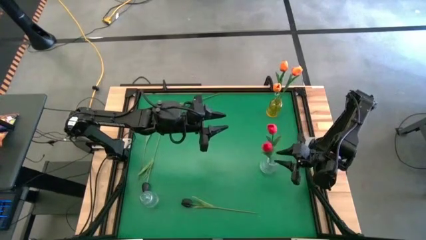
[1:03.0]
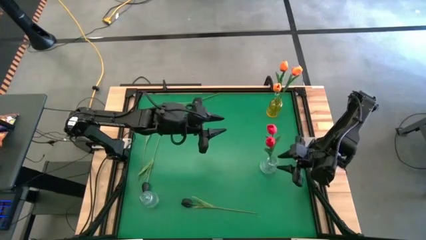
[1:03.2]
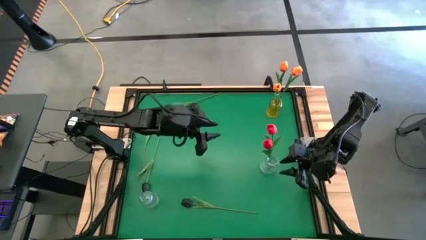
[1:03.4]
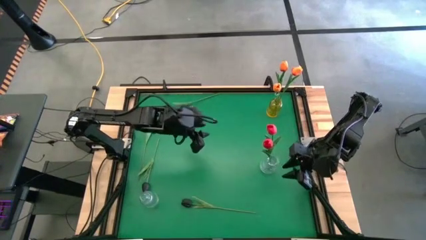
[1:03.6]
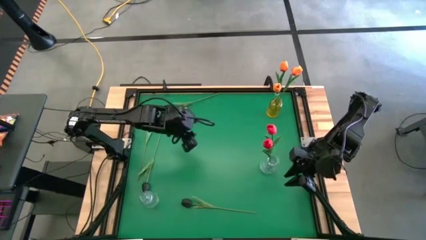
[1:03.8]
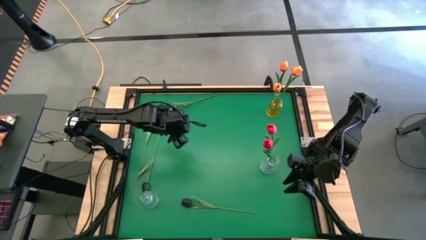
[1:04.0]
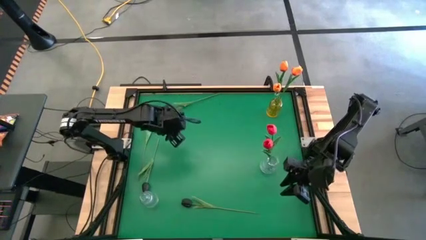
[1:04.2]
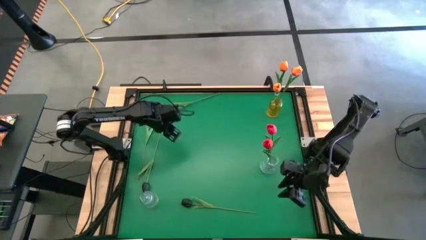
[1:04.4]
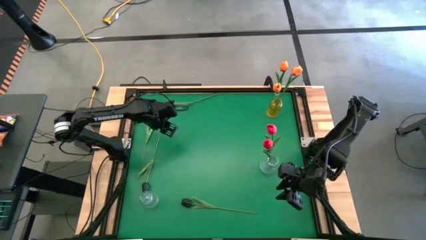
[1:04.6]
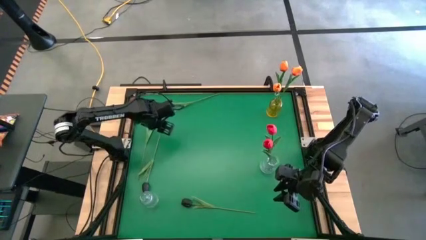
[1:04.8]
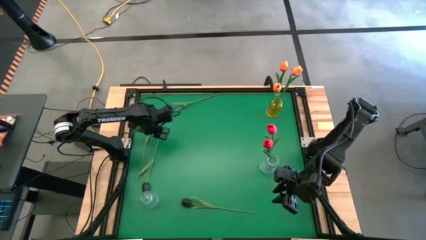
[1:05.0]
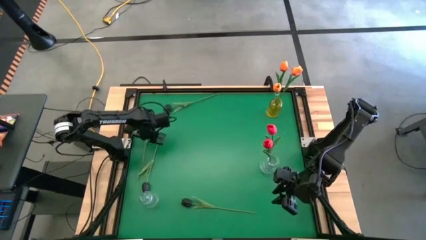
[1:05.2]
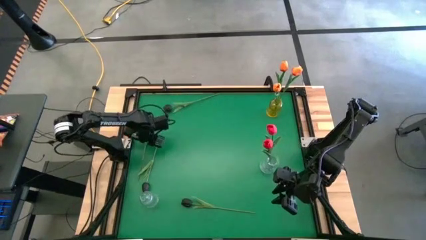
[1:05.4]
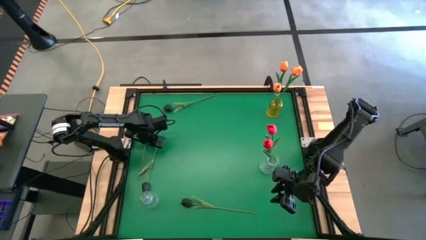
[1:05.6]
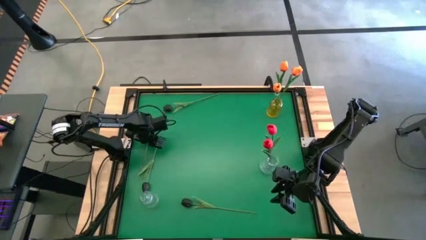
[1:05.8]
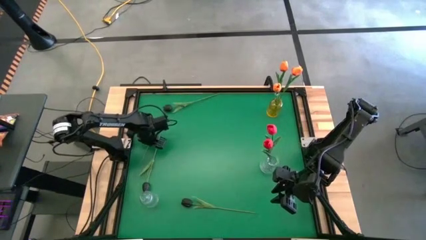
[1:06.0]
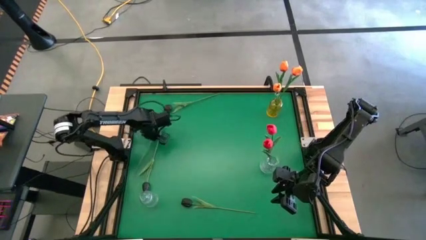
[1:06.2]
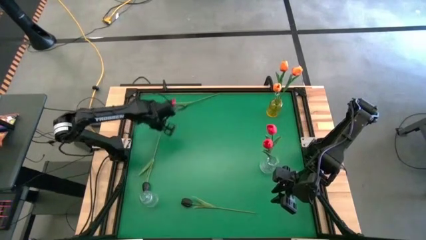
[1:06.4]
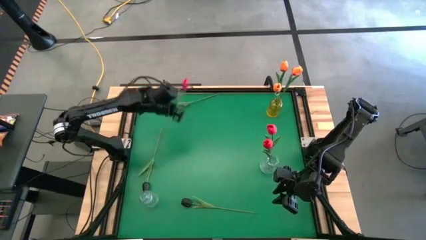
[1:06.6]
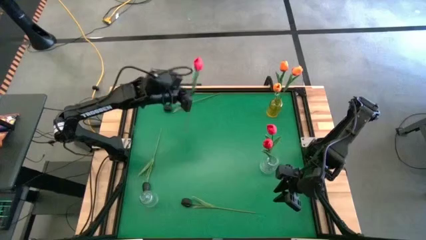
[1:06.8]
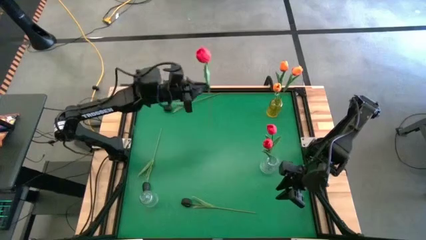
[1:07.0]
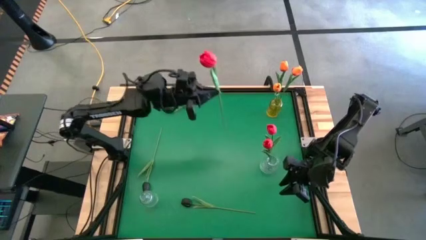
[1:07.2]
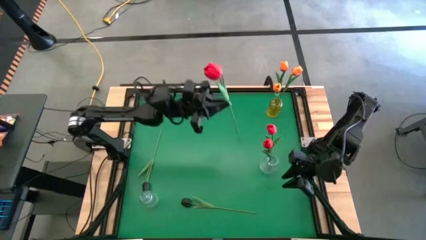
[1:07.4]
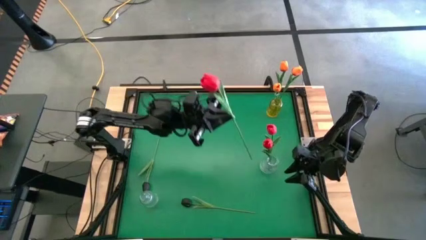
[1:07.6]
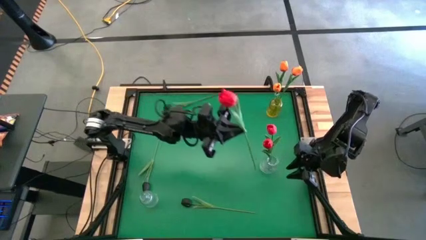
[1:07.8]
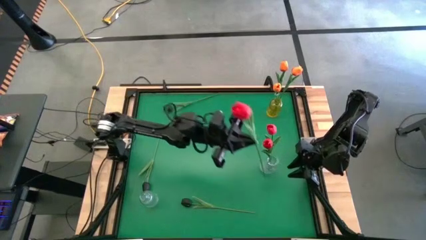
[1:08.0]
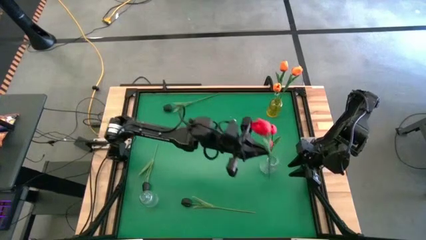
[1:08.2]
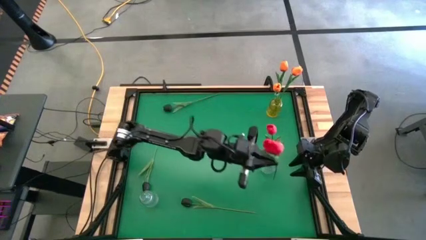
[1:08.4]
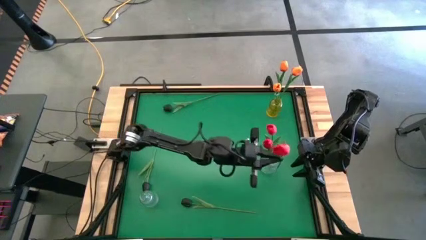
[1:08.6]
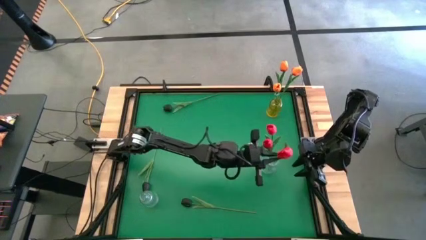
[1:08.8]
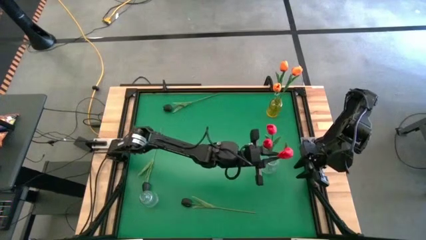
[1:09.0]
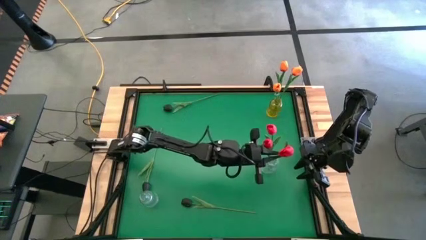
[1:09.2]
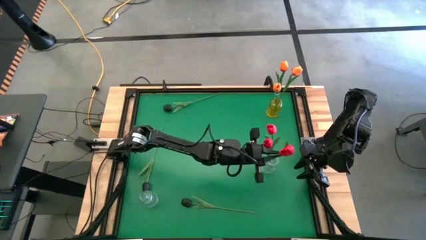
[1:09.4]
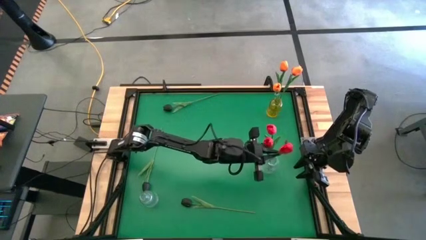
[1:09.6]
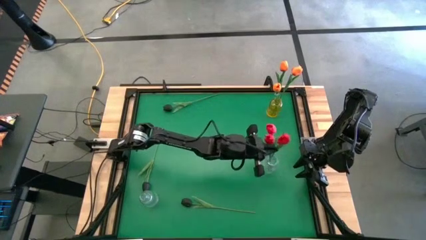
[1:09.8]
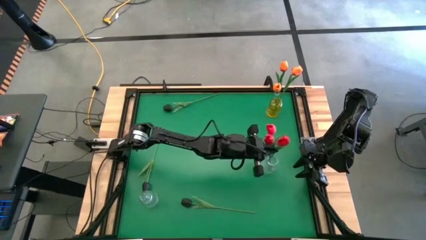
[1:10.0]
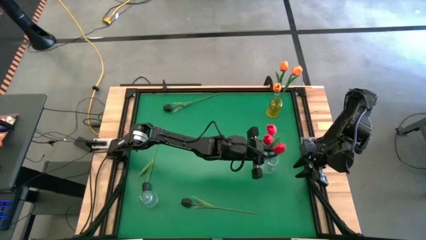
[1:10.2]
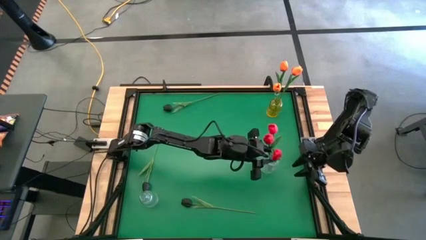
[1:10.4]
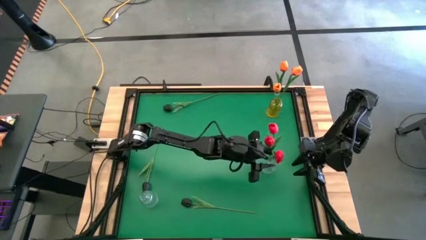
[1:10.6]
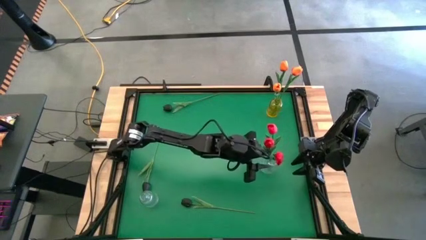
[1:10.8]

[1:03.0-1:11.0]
Task: Sort flowers into vase by color
Put the red tulip into the top transparent flower vase

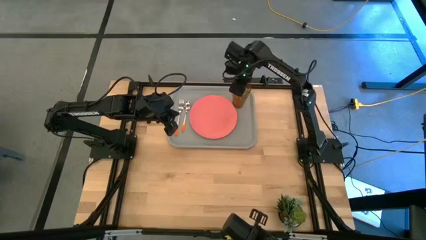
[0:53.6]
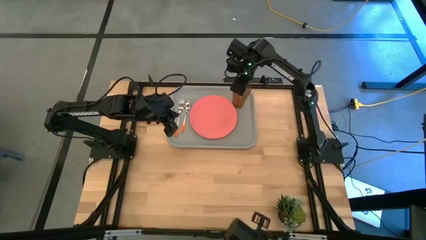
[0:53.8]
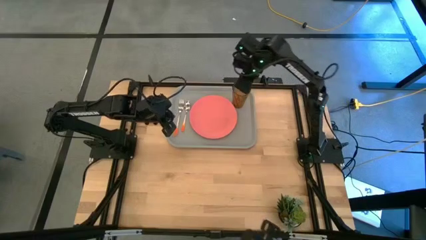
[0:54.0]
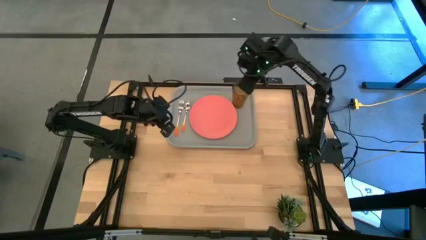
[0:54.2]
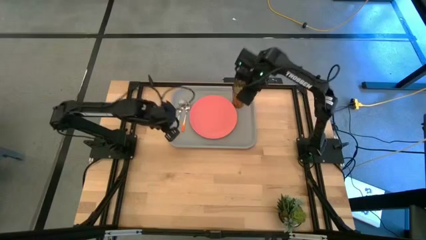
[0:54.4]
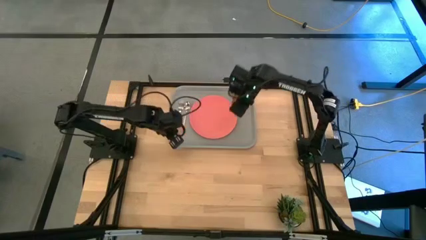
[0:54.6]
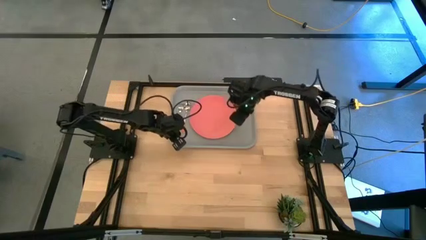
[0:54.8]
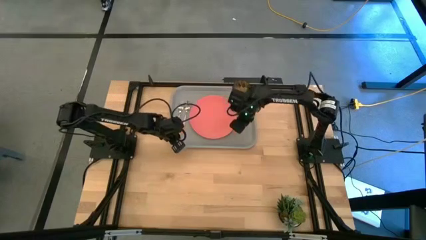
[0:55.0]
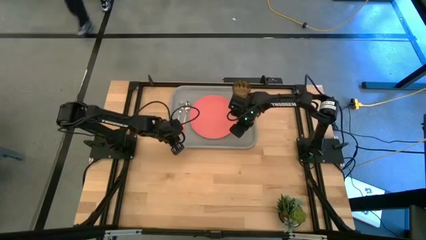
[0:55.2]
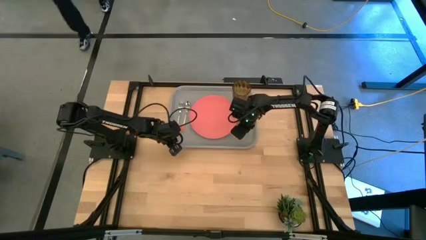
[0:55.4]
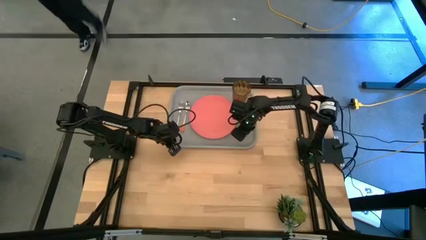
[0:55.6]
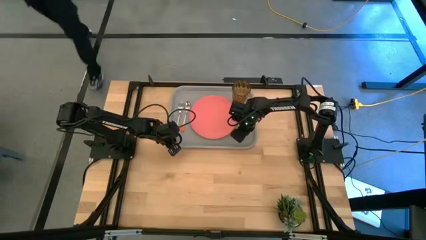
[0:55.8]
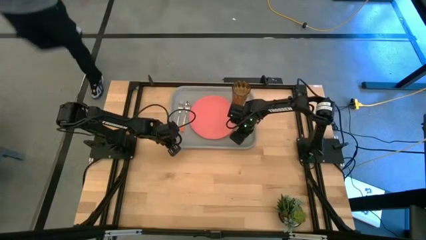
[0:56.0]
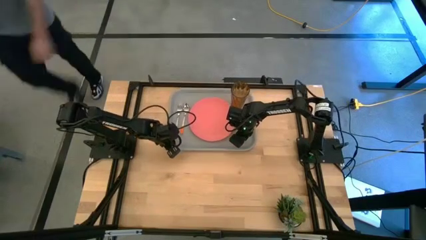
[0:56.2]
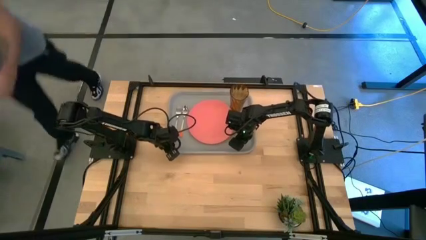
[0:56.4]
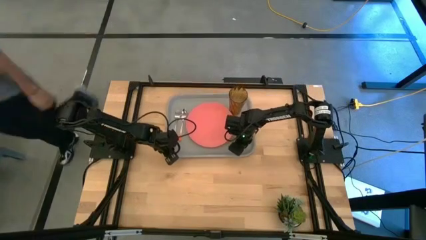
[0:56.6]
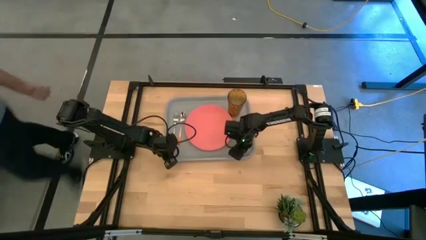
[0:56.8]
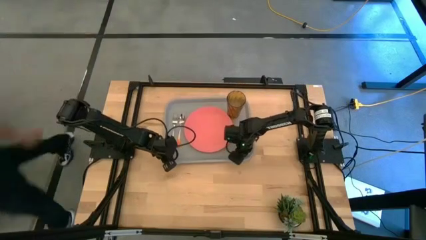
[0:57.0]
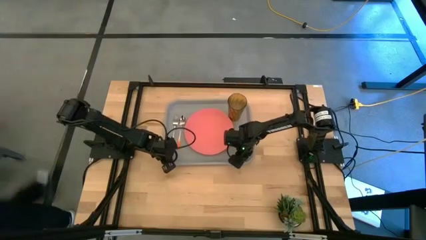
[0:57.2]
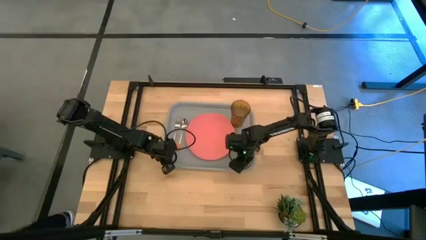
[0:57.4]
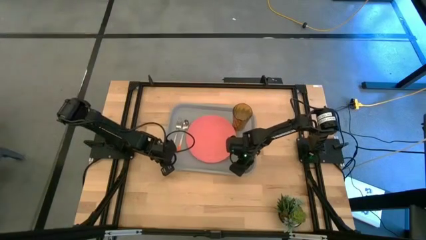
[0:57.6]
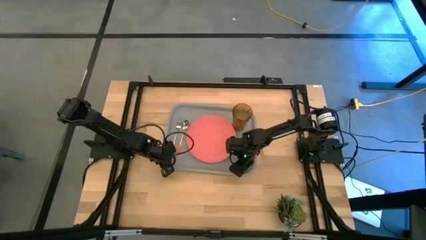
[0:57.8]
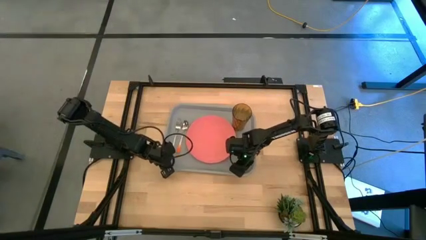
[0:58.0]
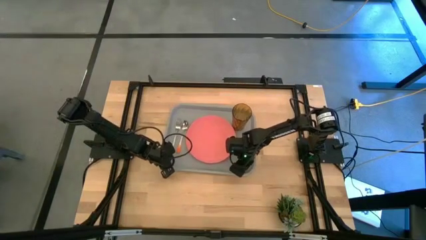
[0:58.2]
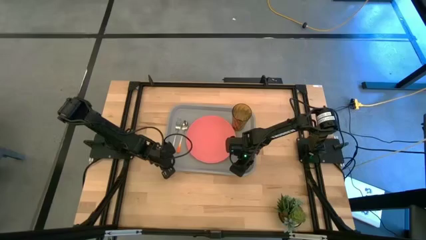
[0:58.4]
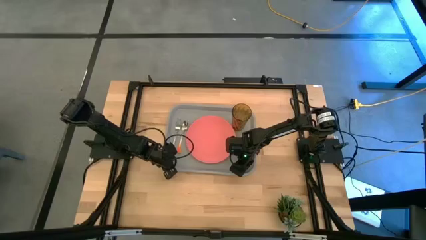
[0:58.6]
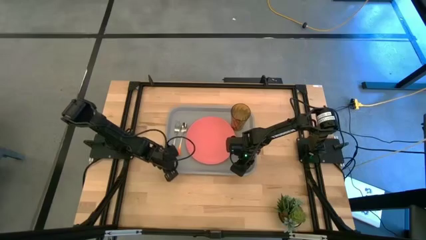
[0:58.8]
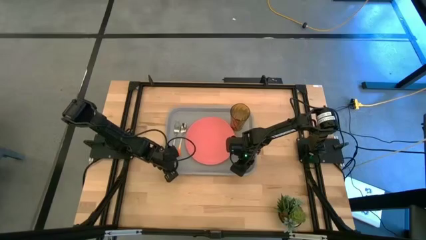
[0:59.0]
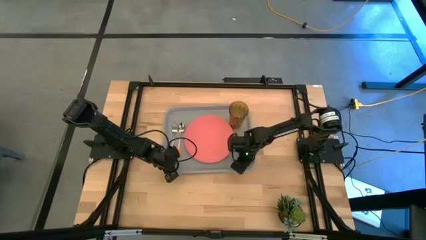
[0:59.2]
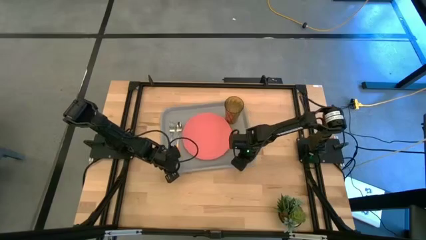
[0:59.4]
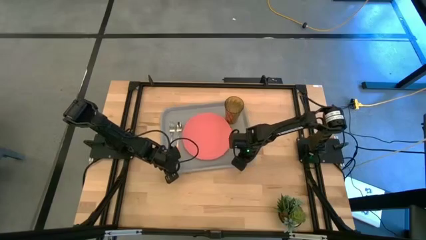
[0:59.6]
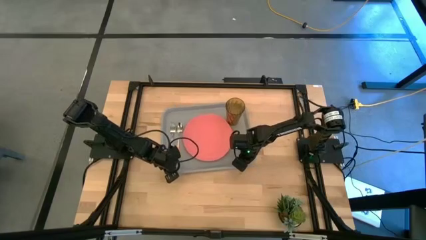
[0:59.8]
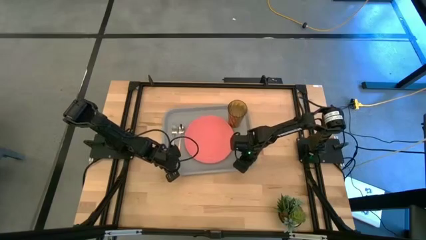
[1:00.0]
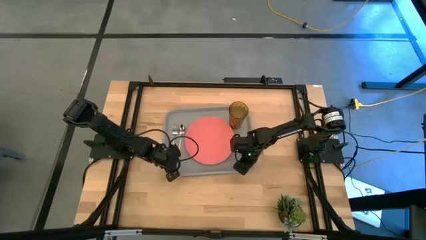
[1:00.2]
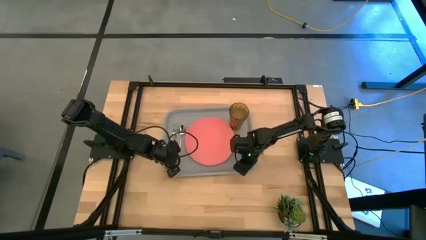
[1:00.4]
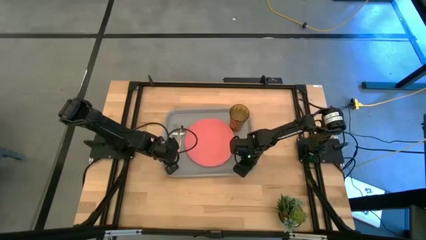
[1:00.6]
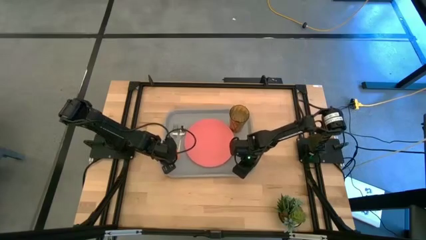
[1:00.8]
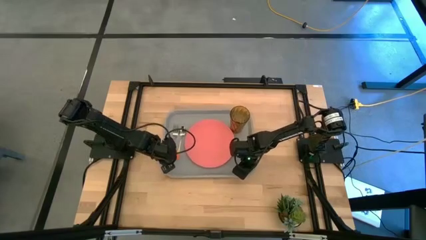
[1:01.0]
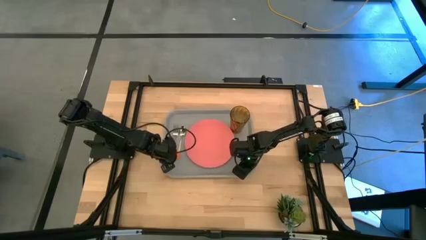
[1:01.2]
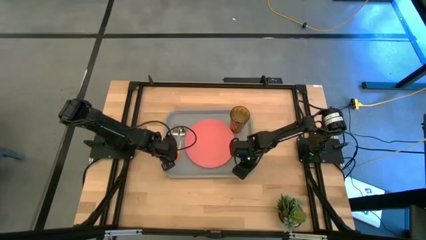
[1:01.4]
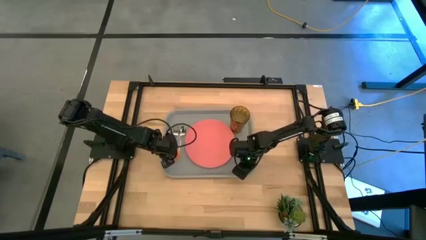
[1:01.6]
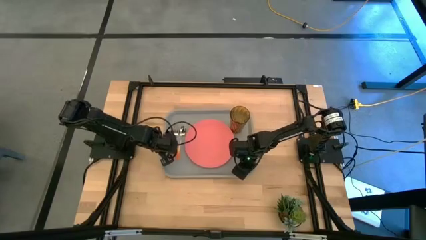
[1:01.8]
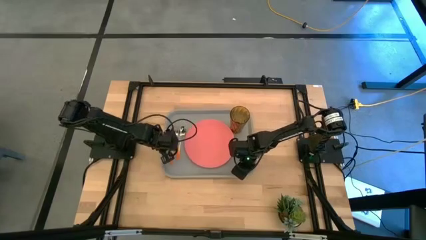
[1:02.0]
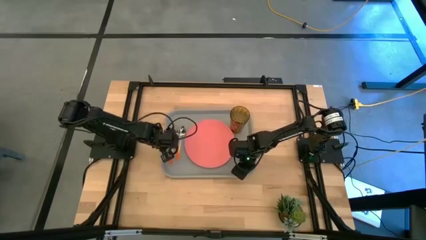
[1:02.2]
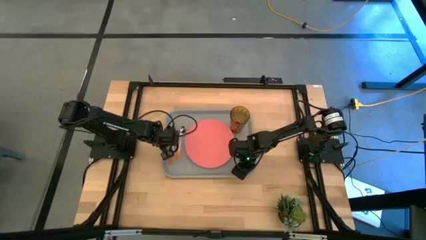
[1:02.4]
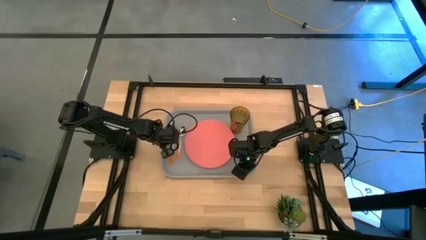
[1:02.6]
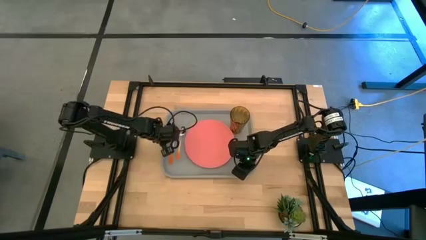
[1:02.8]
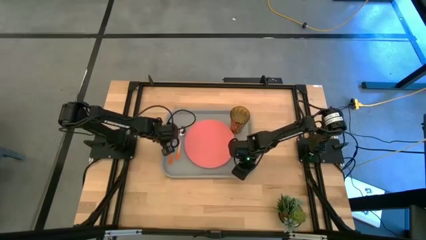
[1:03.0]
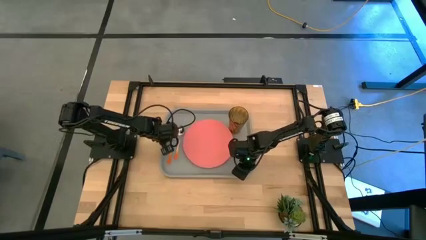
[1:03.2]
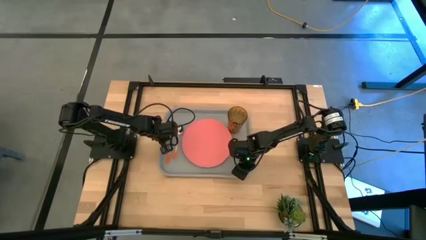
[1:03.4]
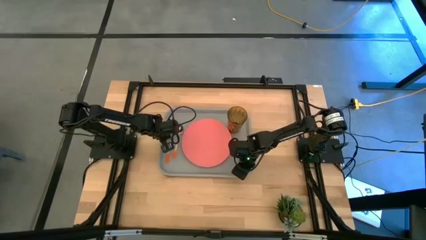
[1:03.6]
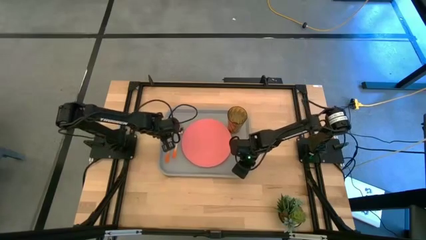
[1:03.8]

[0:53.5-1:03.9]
Task: Pick and place plate/cup/fork/spoon on tray
Adjust the gray tray
